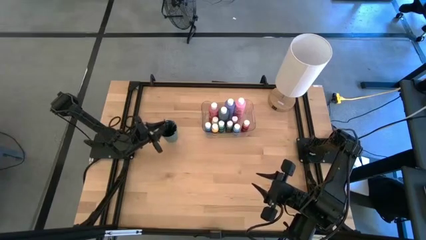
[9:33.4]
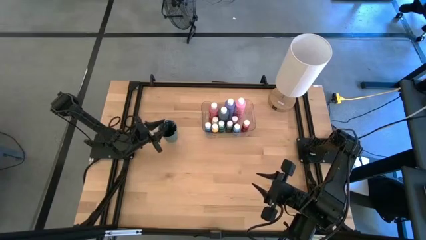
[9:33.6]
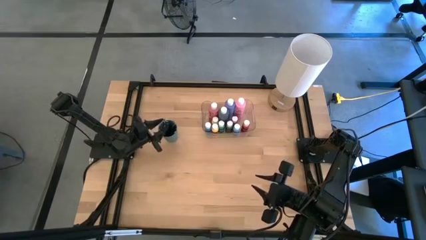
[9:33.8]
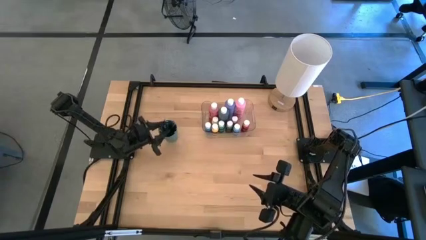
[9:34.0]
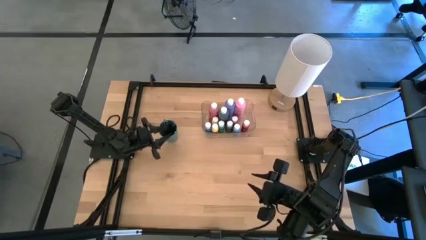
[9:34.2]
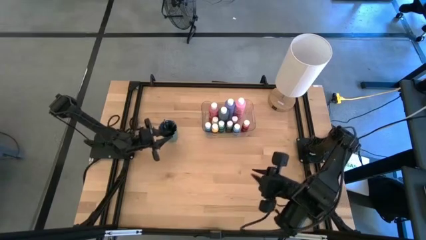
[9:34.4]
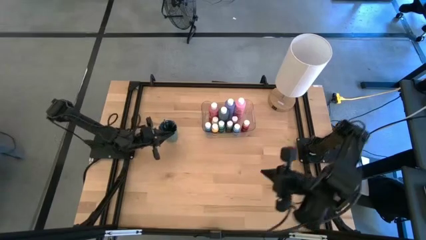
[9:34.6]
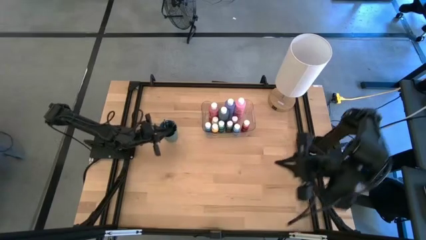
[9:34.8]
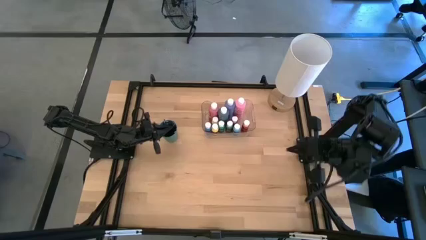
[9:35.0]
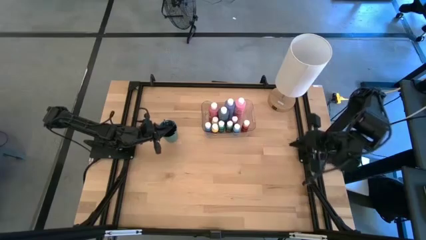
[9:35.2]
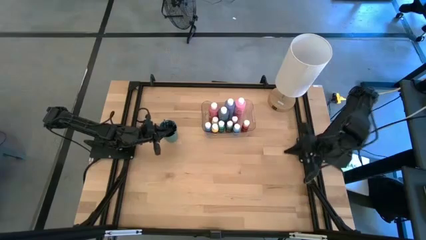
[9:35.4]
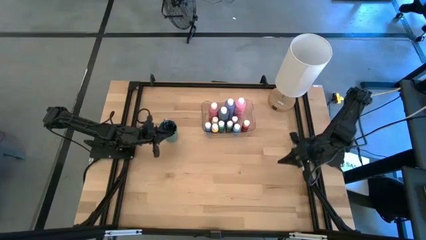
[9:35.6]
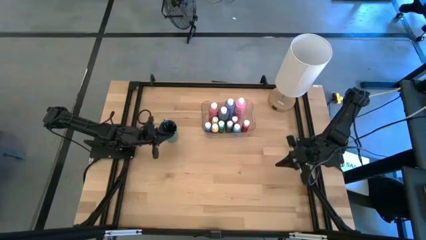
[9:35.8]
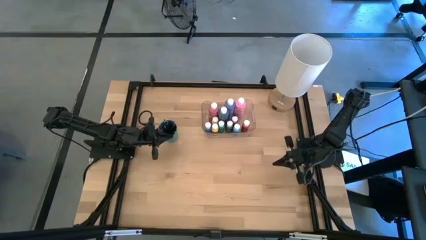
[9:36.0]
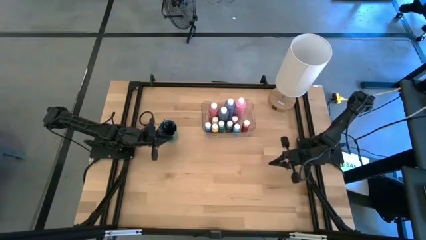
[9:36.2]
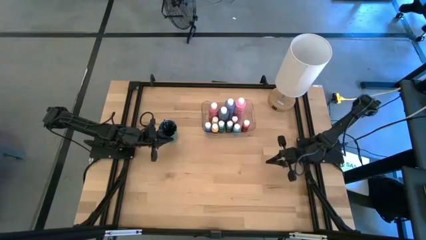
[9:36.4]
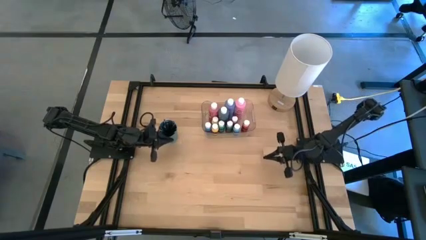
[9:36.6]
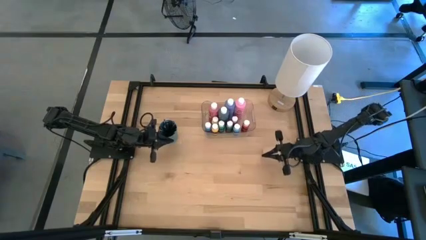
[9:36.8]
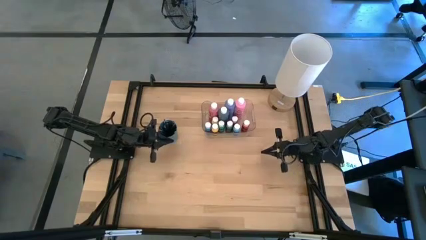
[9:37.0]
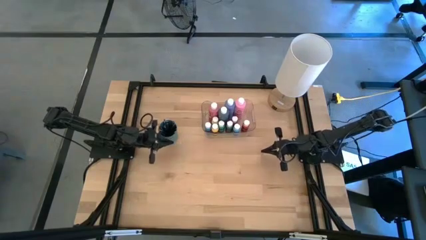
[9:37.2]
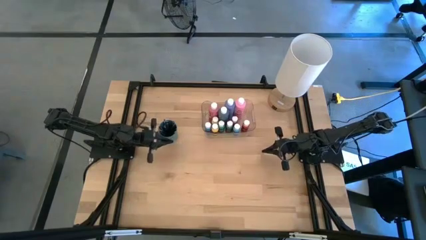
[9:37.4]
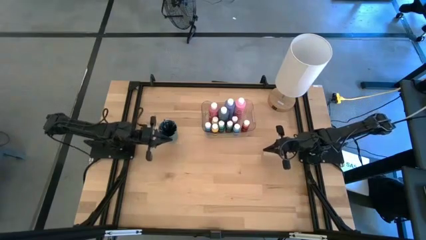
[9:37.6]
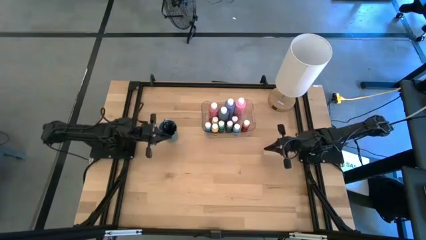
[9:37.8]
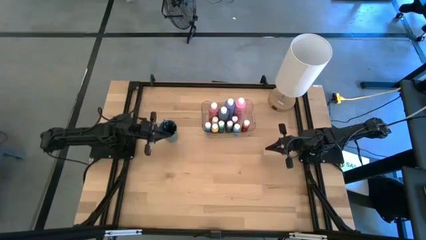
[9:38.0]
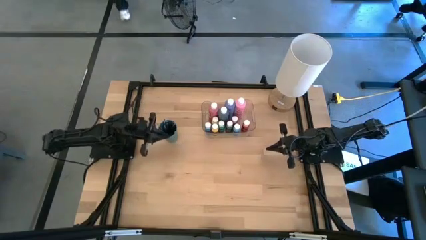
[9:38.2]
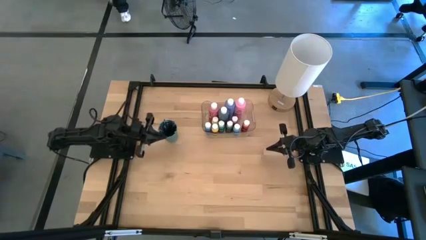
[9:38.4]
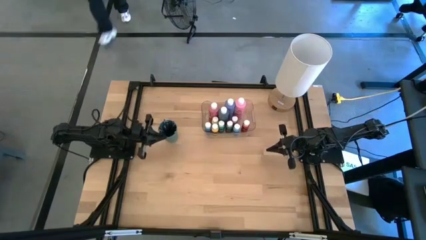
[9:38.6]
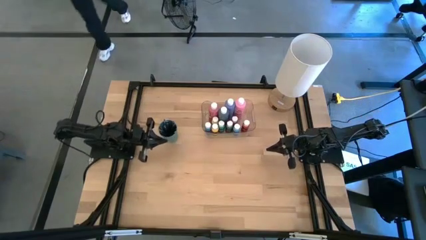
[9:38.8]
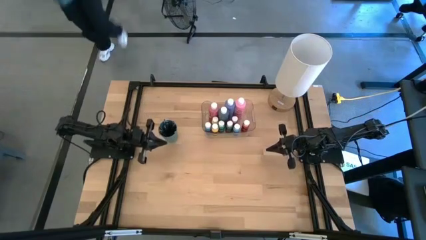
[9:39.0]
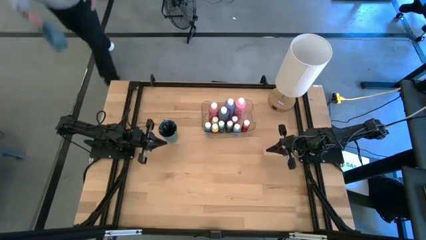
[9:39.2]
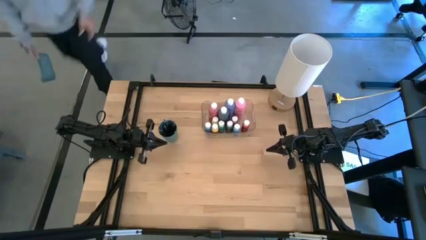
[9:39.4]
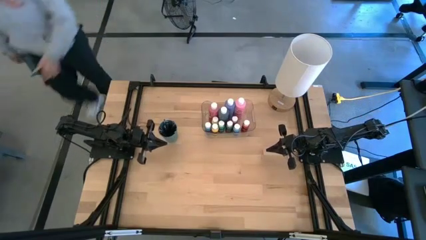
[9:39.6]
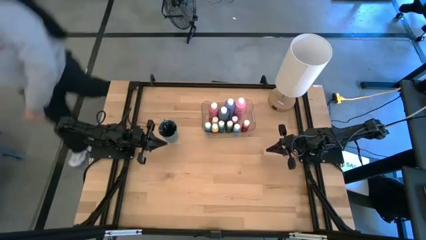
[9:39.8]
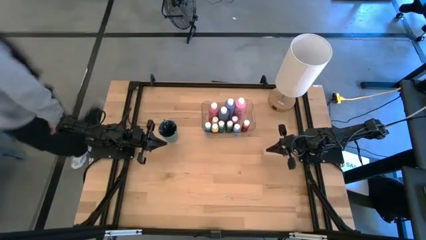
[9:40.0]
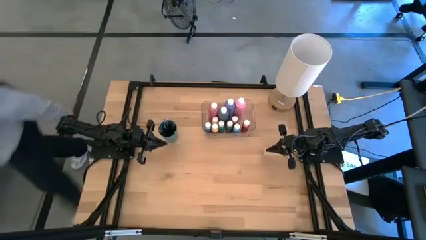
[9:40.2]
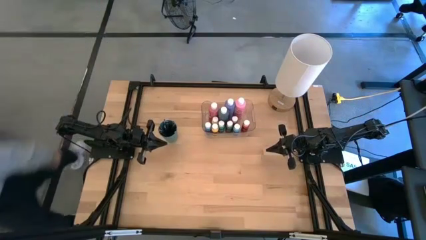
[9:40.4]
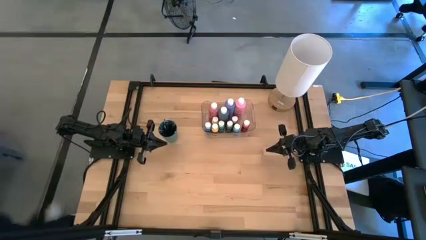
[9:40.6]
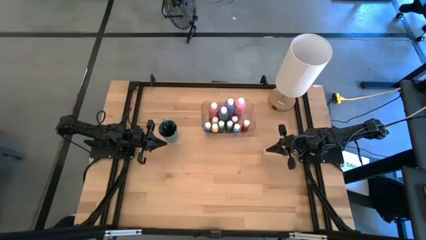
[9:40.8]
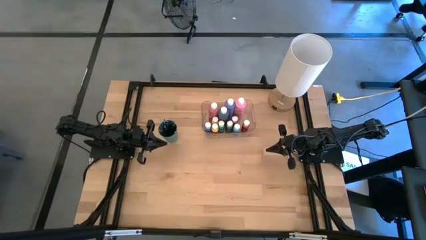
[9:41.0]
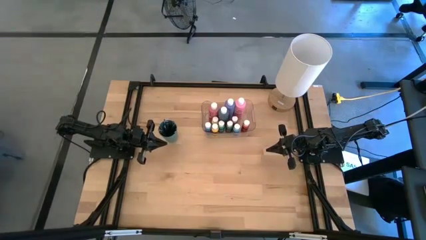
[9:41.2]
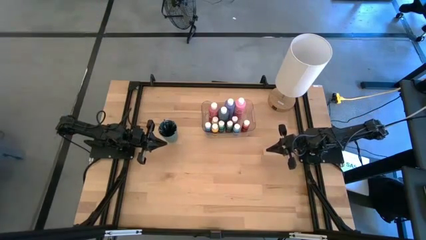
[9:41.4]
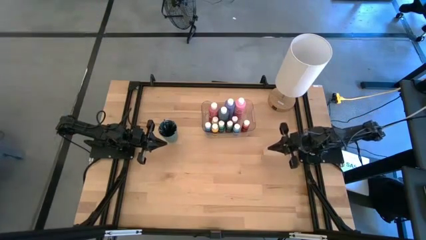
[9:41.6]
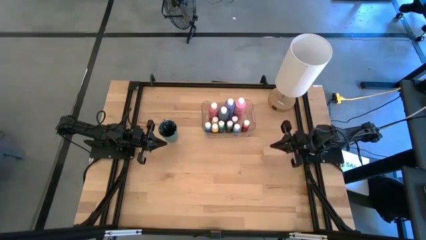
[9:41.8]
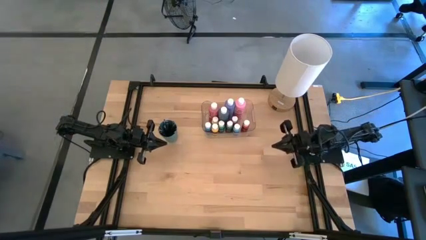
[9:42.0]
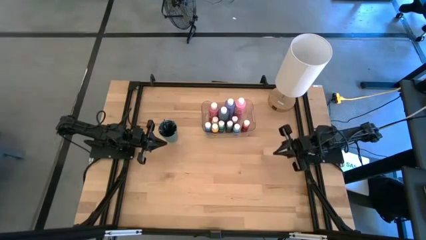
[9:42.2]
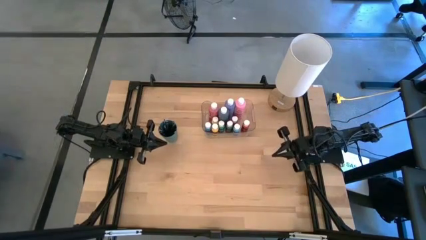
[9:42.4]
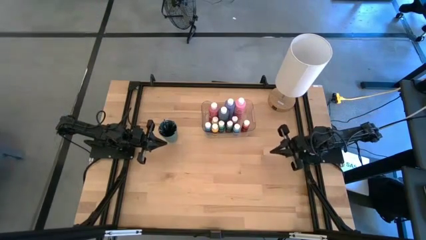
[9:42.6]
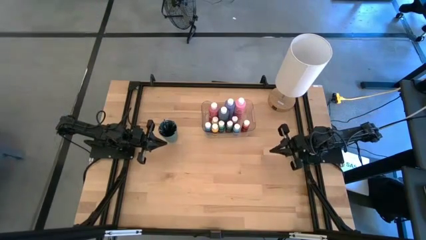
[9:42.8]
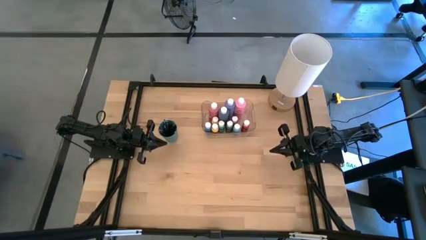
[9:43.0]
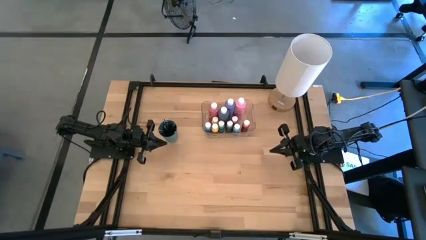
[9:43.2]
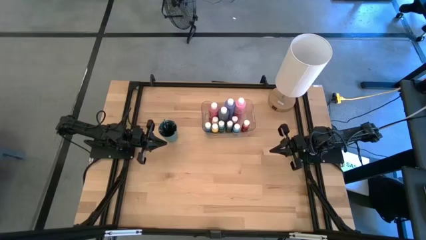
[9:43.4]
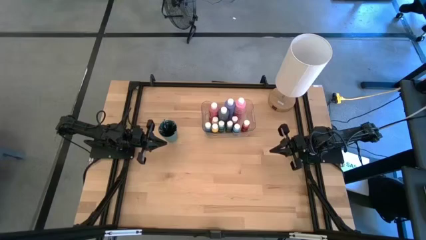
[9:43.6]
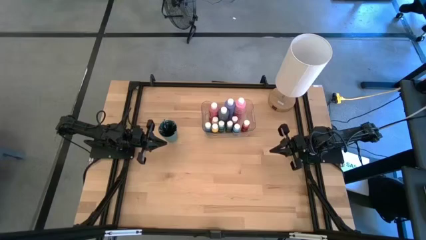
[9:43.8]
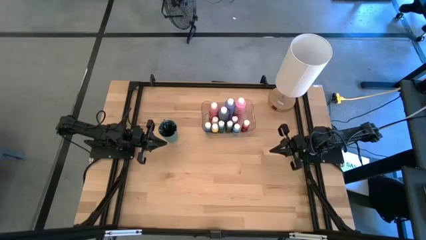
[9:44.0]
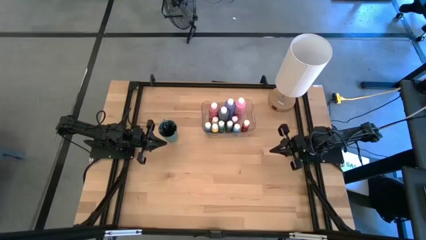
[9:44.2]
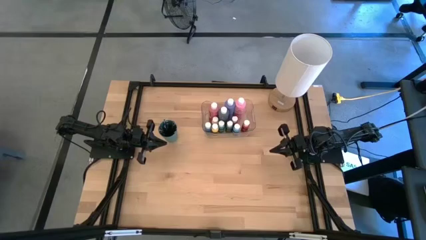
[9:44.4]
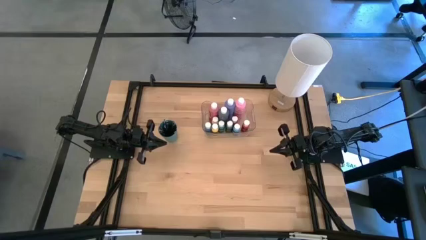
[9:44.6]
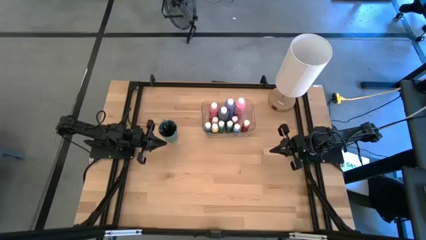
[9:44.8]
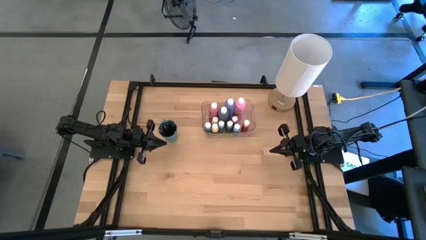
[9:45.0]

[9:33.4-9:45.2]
Task: Pick & Place Paint Supplies
Return to Home Position

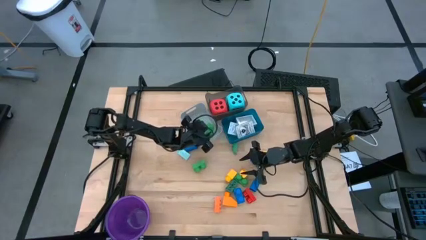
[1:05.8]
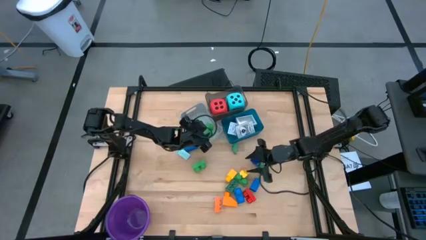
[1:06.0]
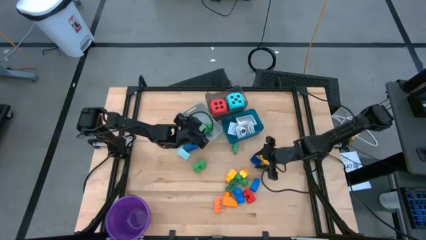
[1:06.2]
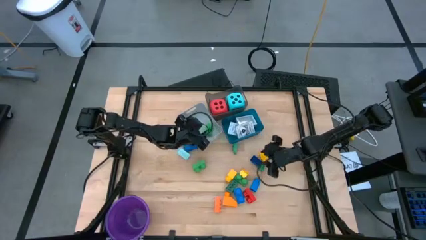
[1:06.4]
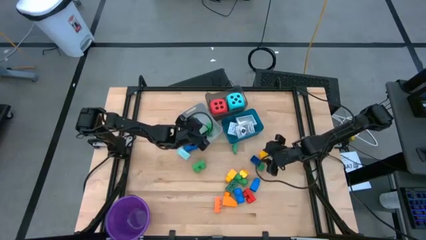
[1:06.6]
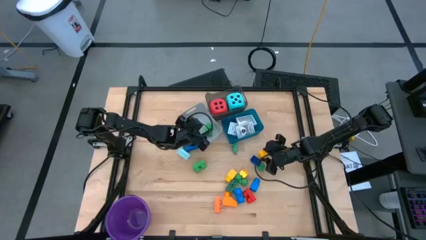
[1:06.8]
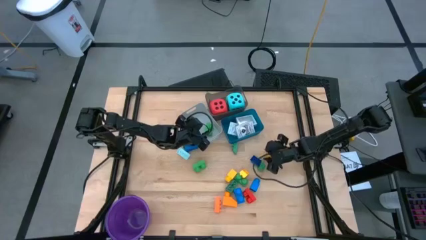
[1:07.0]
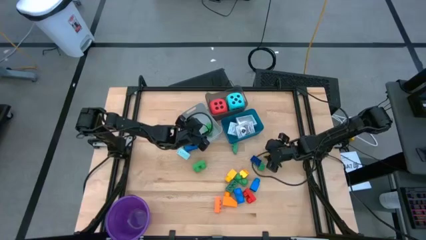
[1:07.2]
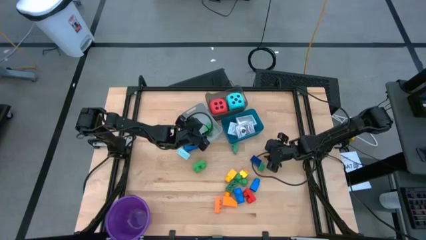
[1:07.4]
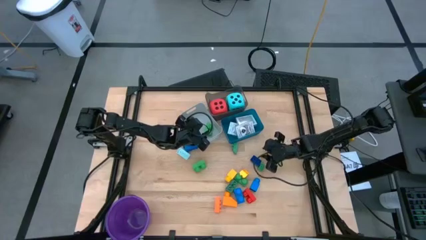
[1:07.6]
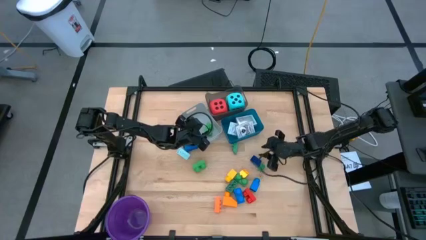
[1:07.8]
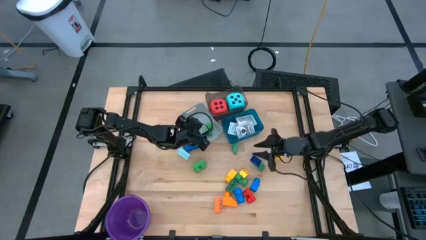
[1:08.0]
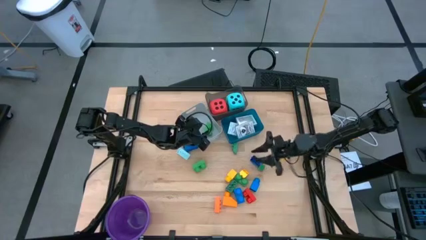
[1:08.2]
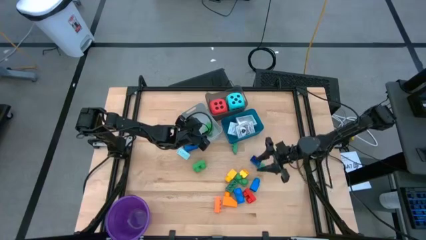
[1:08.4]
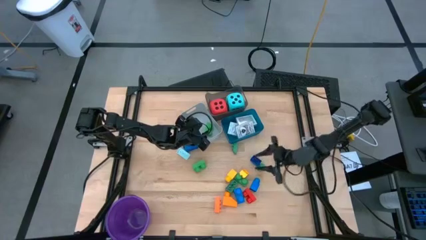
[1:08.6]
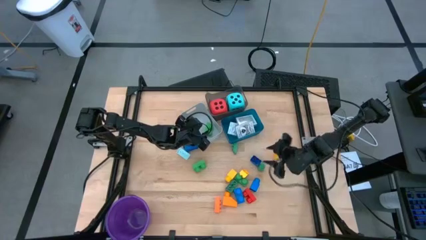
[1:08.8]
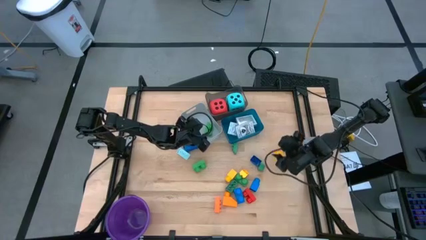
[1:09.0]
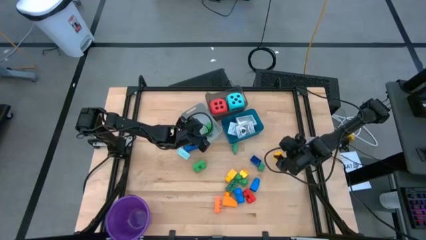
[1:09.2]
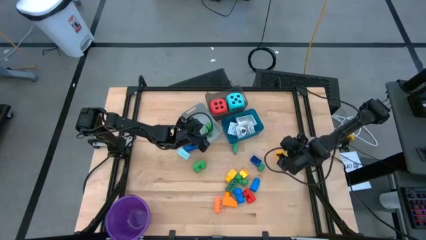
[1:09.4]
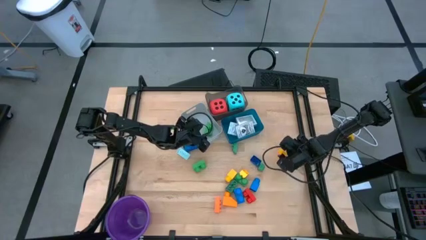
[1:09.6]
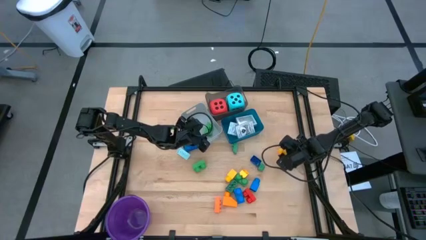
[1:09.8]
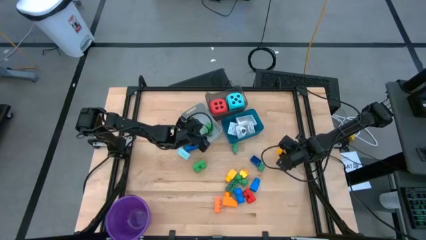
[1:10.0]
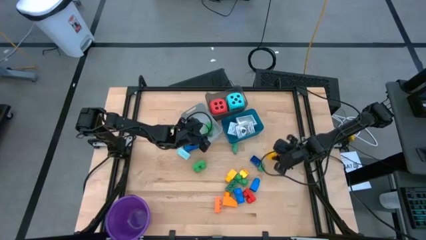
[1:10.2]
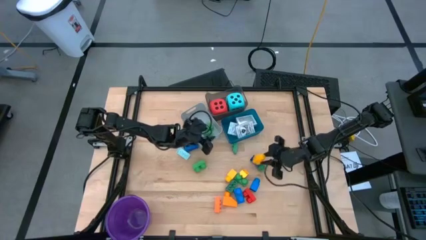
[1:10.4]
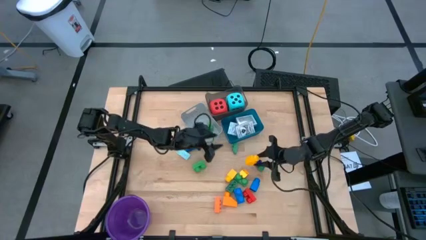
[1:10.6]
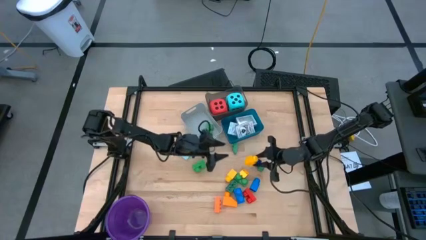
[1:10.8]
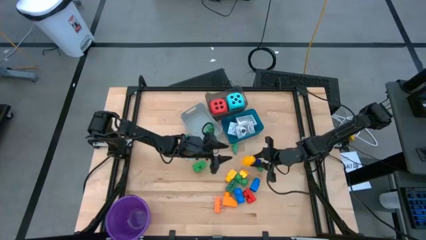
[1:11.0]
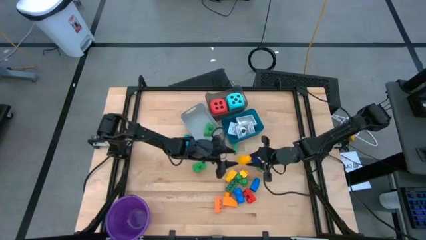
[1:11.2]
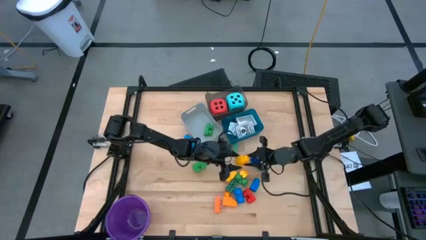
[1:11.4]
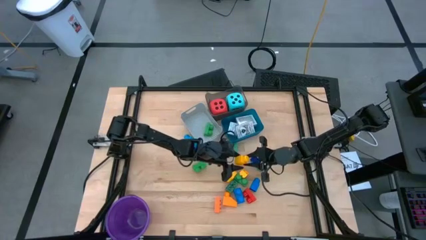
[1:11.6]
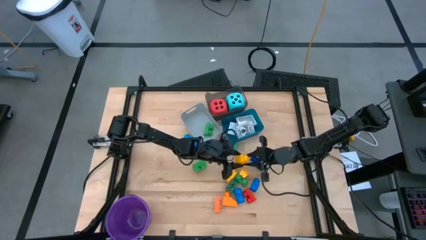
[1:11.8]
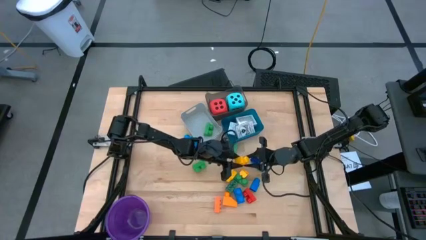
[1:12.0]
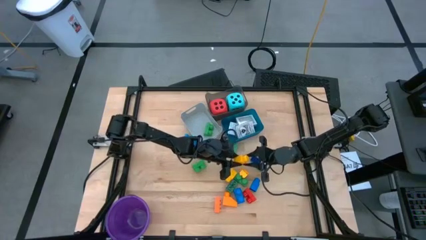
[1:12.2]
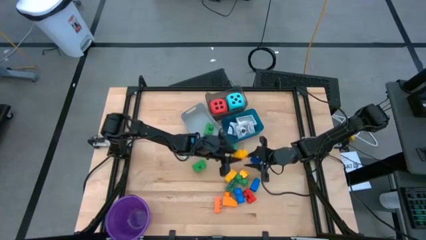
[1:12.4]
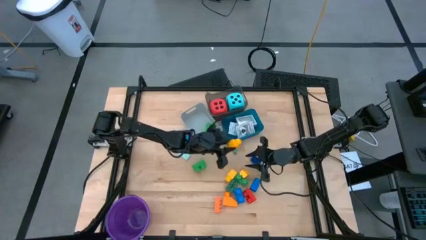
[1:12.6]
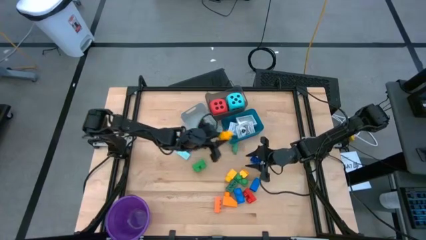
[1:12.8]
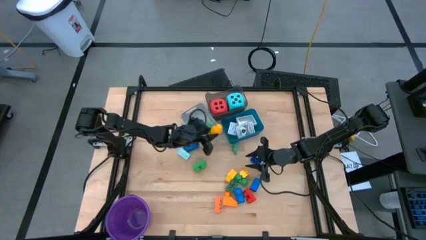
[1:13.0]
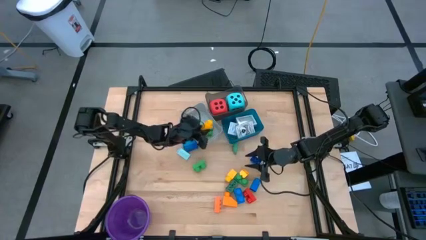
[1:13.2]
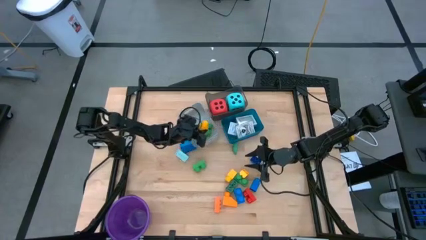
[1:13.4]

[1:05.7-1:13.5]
Task: Pick & Place Toys
Put the yellow game piece into the gray bin
